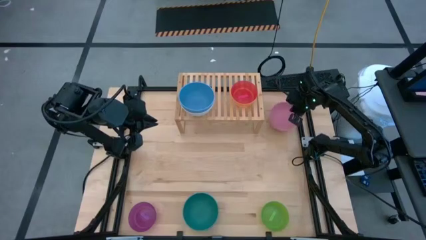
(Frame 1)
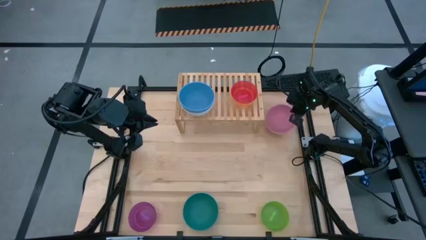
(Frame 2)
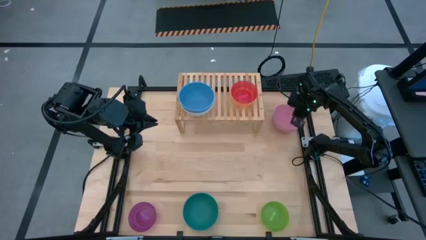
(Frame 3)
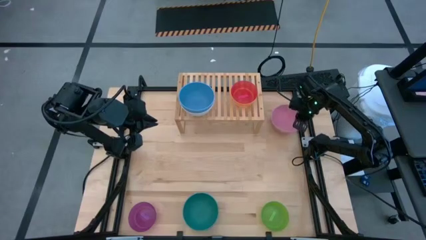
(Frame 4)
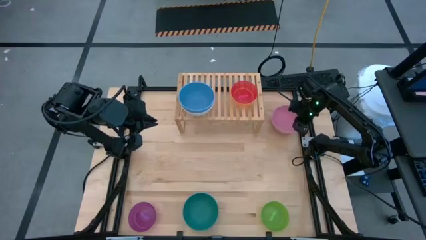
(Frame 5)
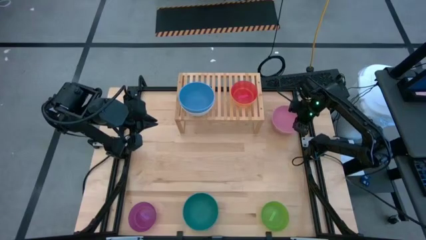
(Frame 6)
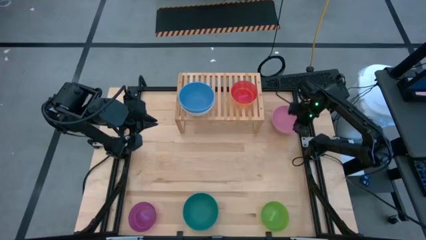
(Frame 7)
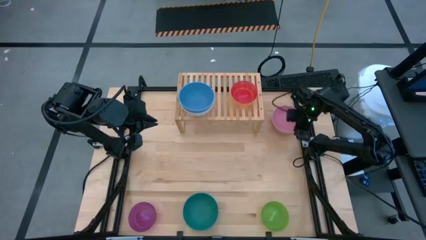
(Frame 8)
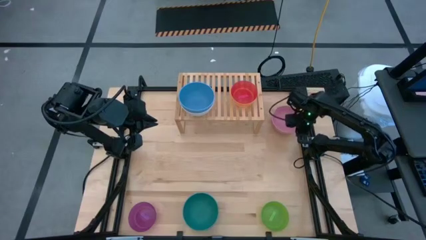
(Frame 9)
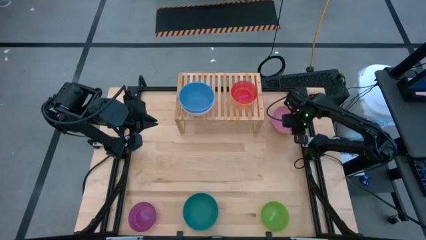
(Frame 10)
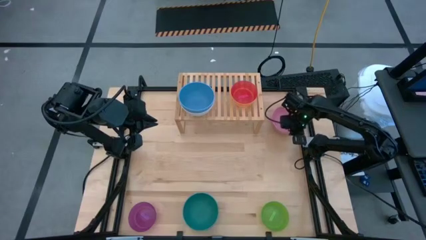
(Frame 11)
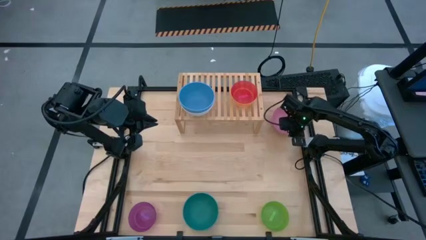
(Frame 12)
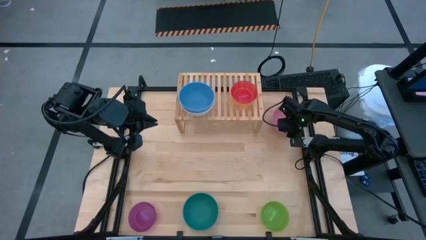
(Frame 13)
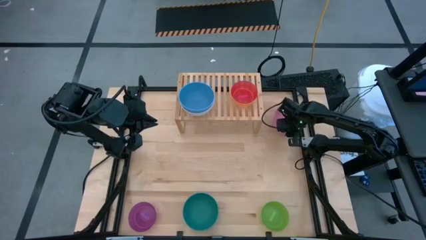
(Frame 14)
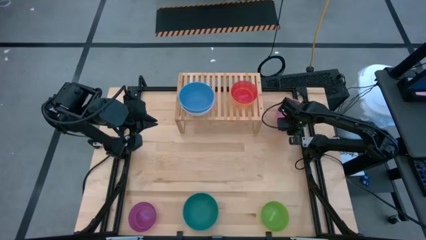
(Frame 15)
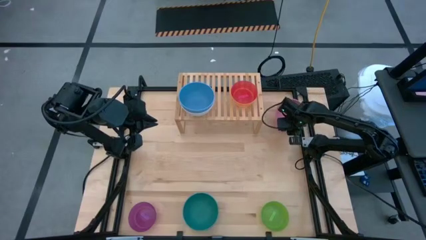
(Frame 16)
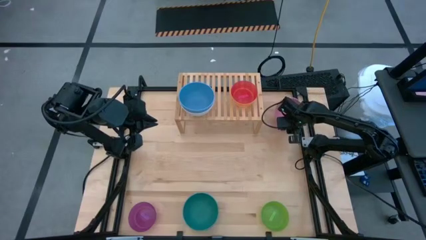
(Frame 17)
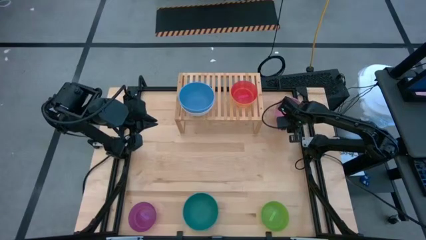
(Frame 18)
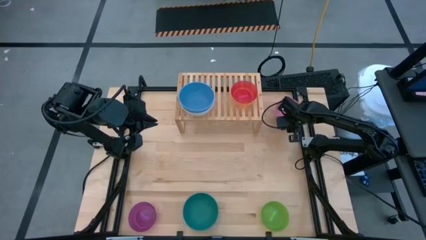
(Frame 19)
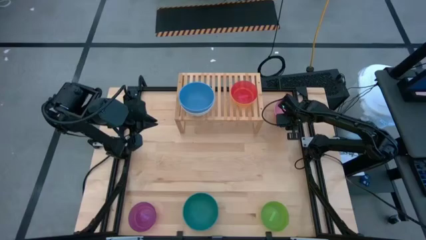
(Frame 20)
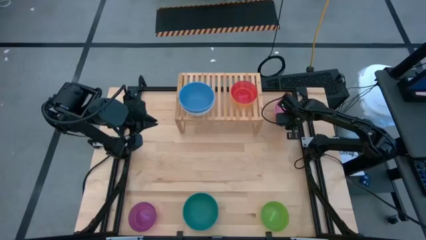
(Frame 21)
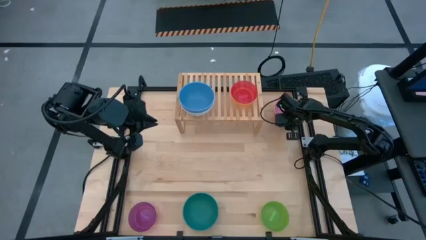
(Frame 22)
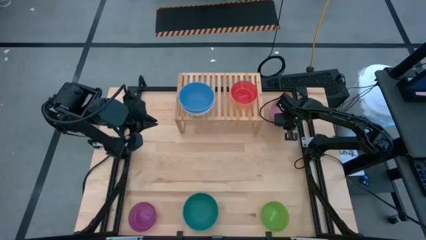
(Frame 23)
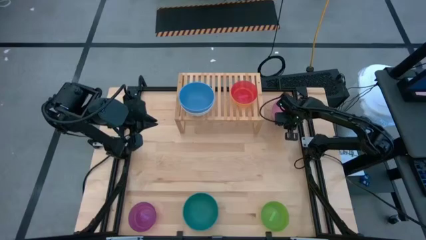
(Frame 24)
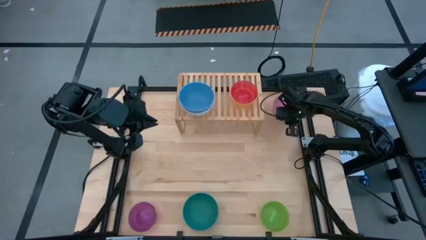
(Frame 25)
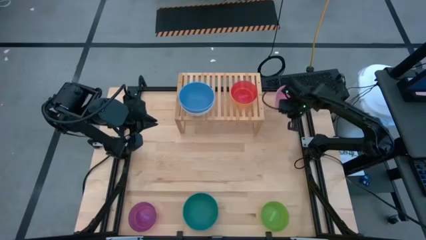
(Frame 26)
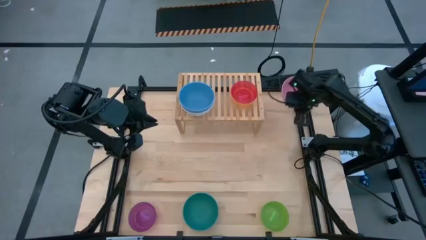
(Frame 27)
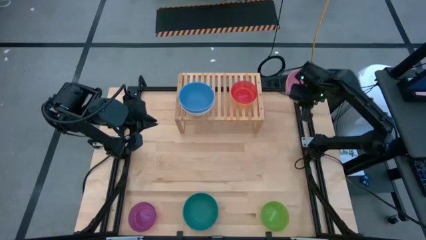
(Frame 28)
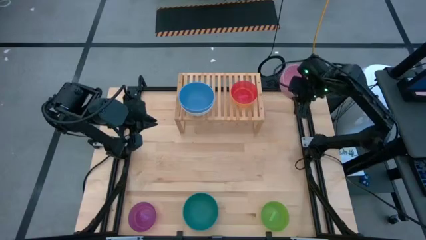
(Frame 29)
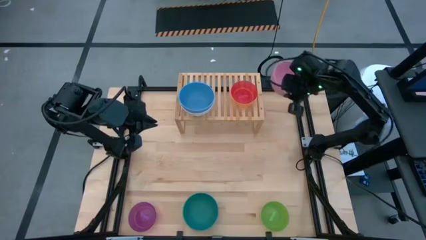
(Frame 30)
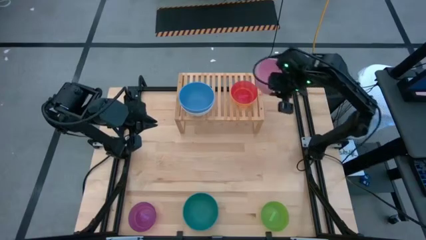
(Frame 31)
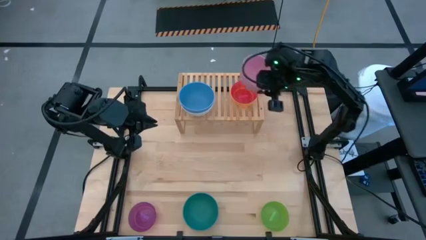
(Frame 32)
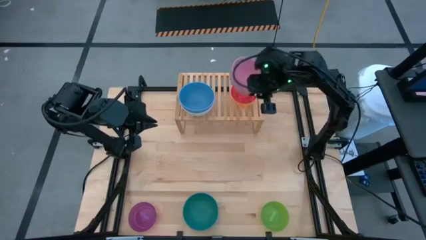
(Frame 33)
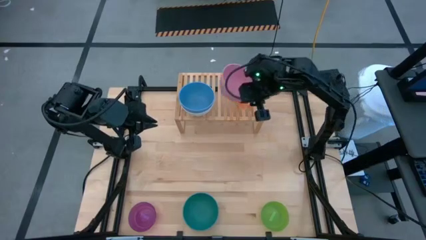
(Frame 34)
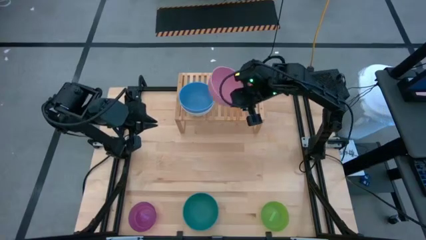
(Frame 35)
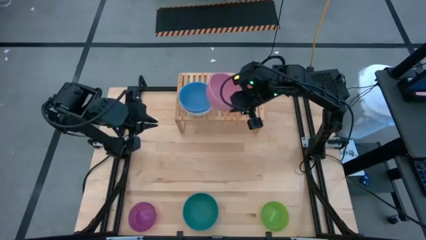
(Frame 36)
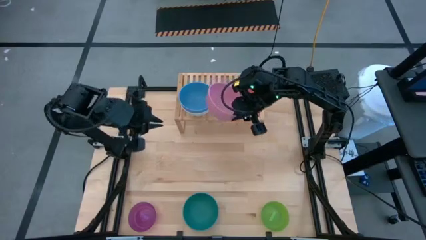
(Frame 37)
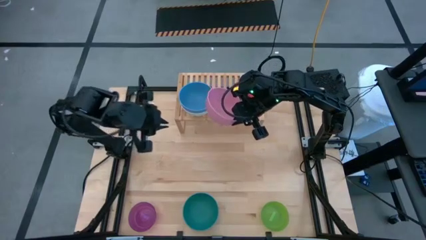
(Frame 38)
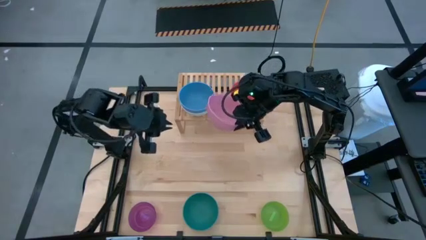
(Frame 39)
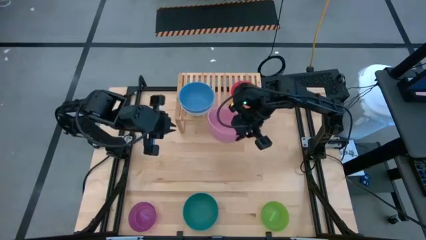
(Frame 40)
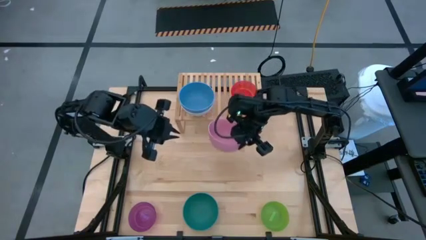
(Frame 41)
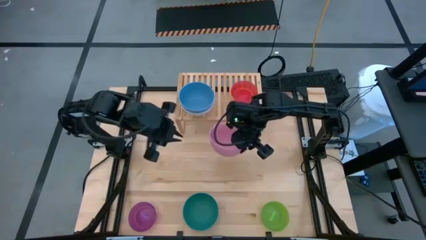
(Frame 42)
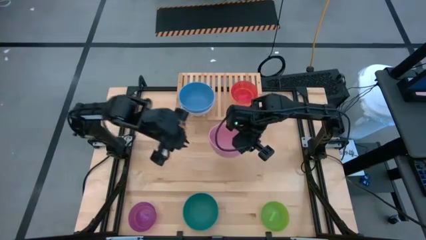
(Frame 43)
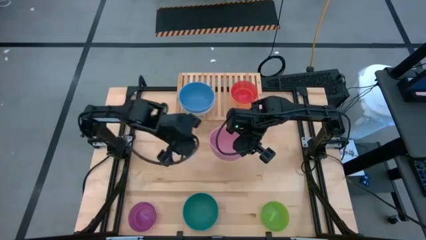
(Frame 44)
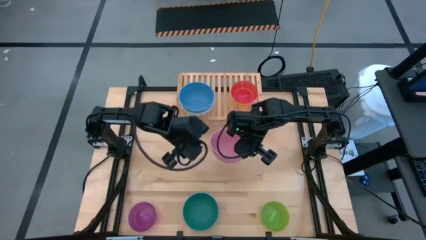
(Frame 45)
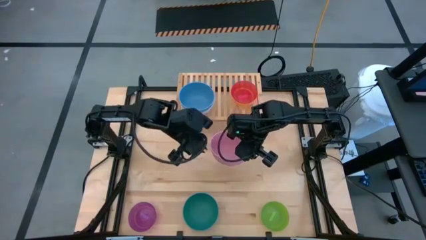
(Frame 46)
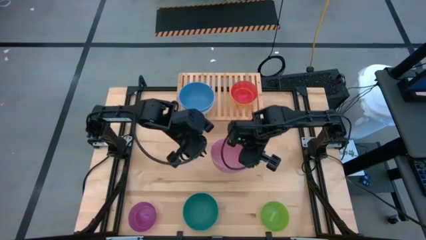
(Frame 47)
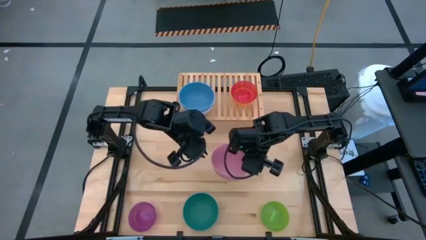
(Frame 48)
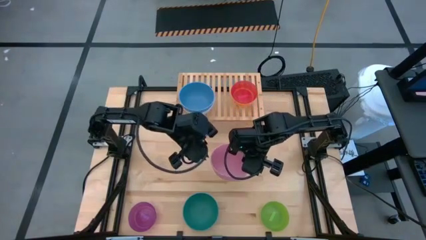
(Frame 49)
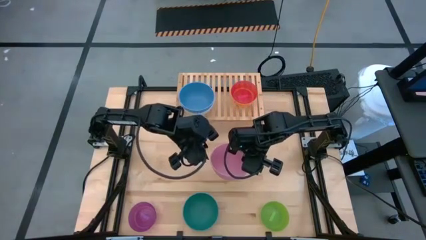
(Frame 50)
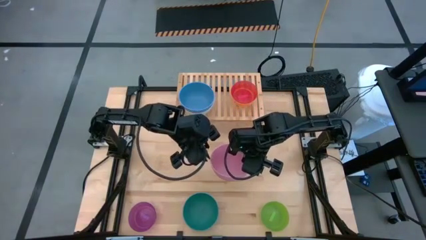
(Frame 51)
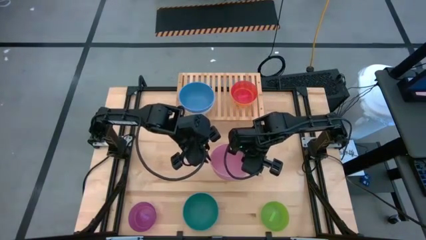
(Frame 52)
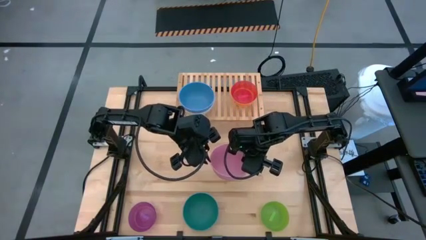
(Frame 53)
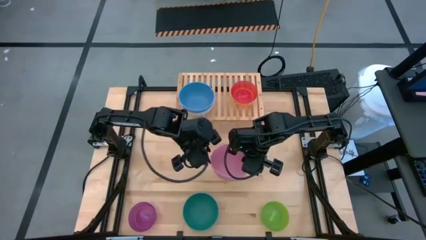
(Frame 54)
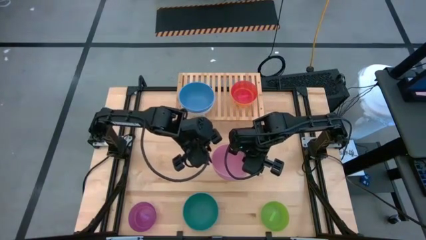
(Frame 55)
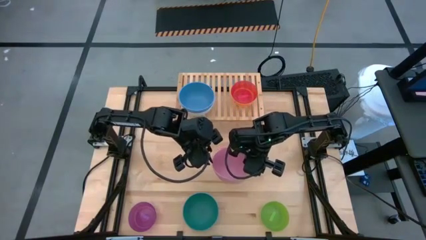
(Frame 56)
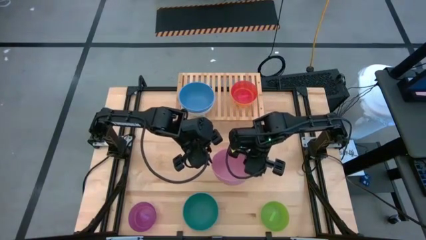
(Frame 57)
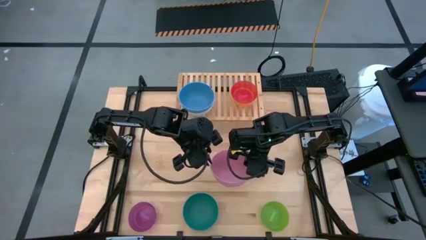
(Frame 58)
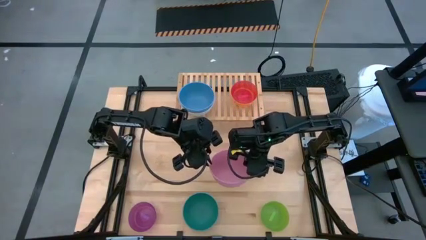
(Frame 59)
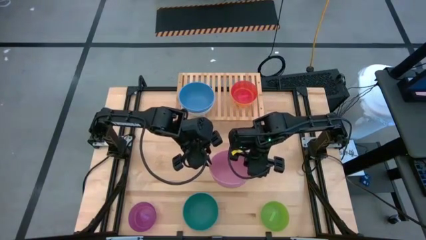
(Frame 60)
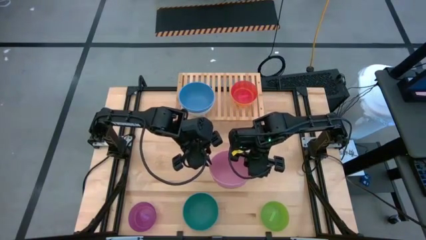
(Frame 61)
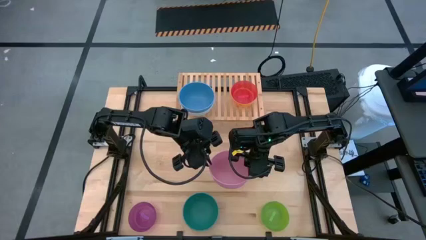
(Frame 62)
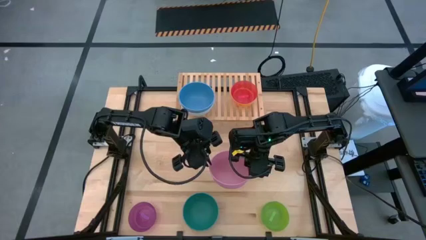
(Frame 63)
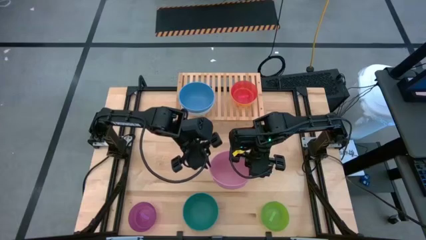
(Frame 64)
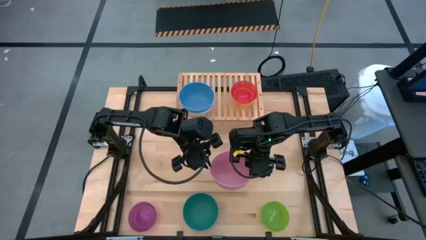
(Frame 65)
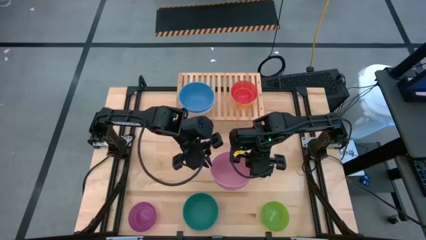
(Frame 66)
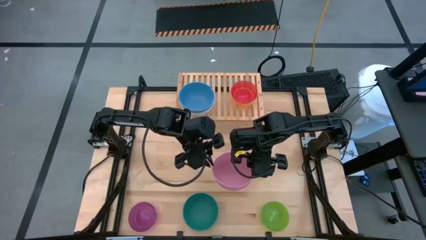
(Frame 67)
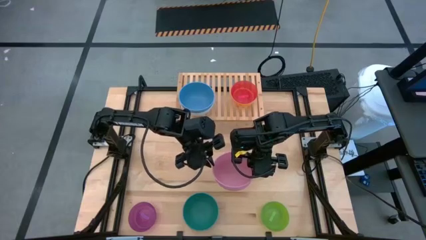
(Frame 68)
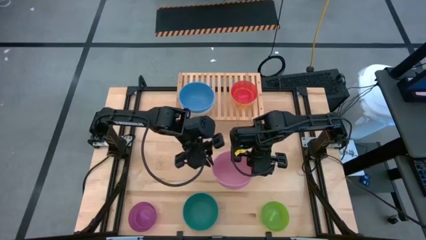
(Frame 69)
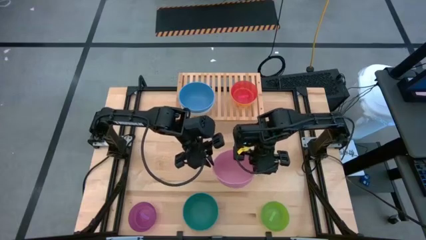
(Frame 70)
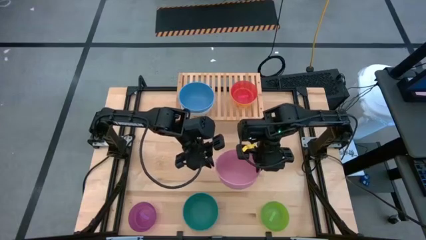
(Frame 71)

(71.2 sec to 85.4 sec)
Task: Place and stack bowls onto a shelf
Stack the pink bowl on top of the blue bowl on the shelf

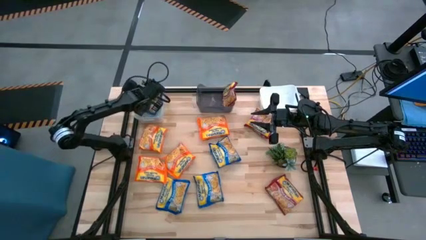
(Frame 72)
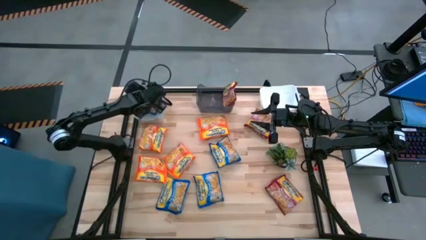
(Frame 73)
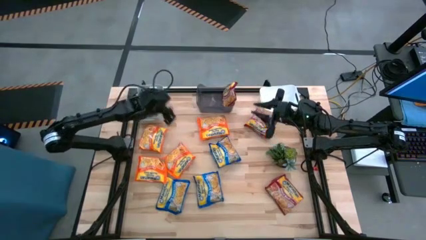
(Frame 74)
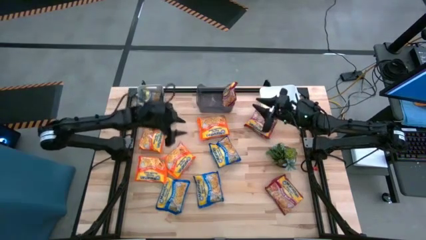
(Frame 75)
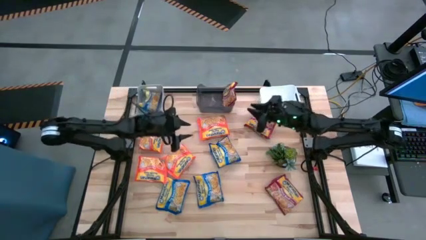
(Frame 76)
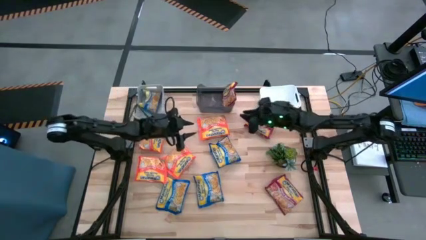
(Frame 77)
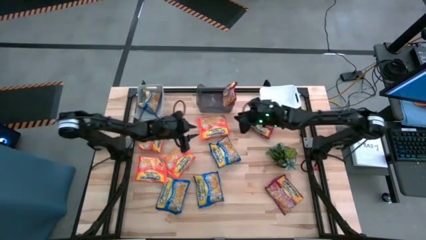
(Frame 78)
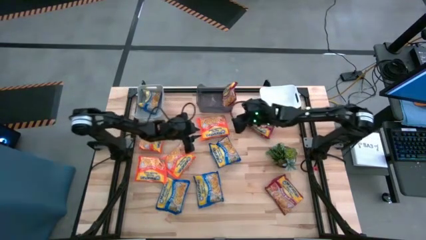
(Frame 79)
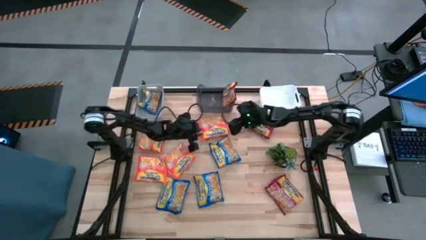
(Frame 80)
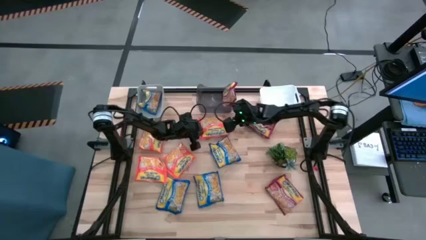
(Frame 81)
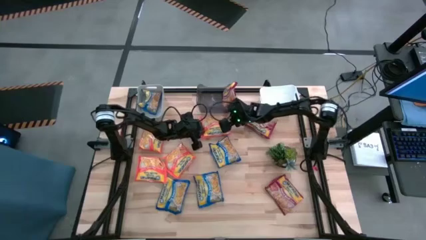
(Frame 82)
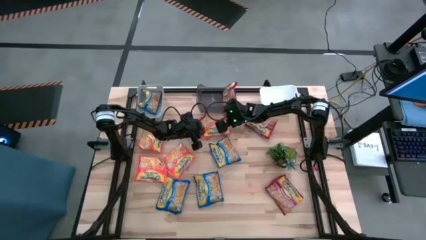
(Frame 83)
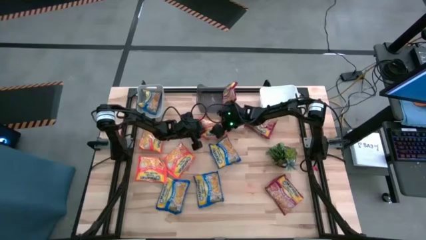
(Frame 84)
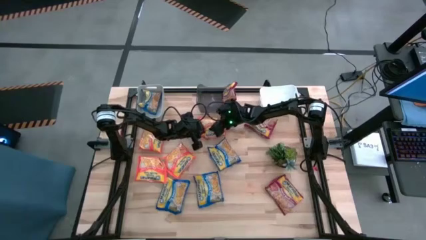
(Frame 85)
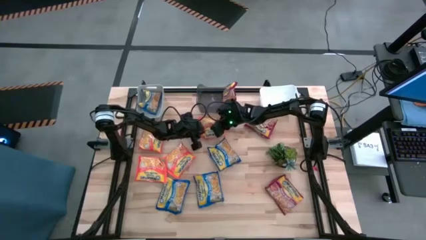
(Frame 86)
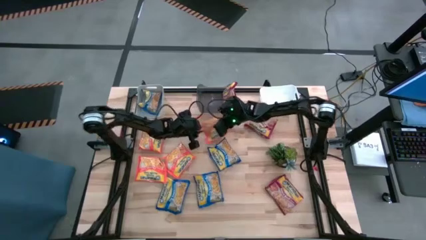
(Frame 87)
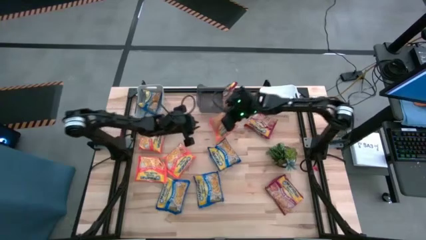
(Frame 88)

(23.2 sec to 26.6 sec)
Task: Sort Maruchan noodles
Put the orange noodle pack into the white bin
